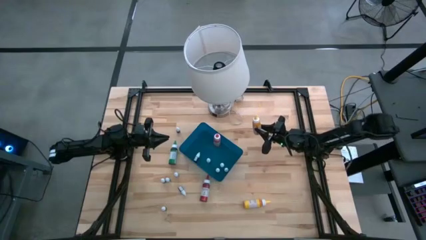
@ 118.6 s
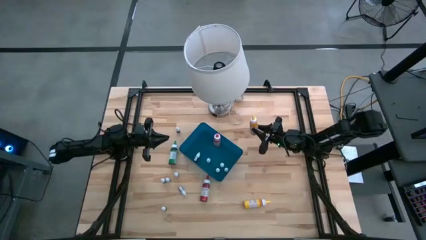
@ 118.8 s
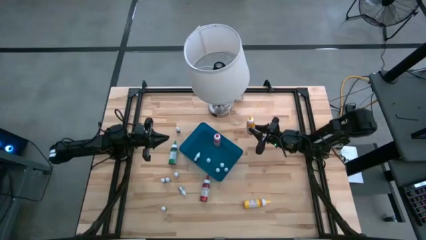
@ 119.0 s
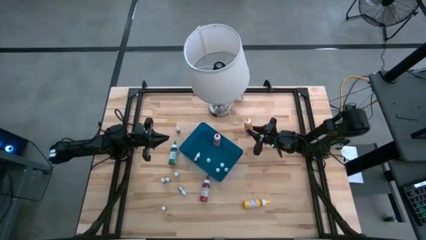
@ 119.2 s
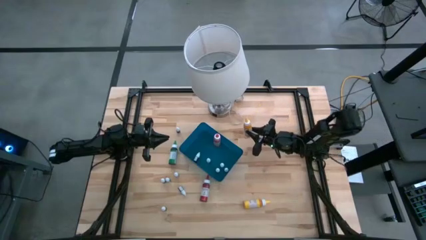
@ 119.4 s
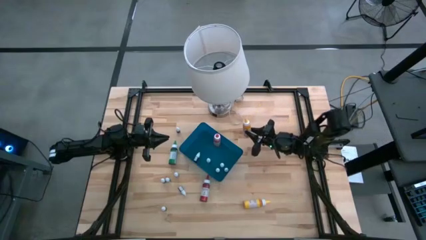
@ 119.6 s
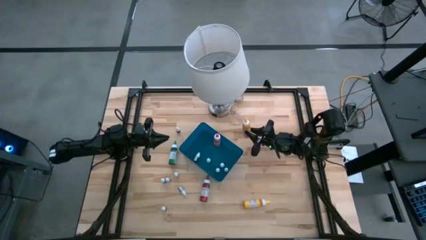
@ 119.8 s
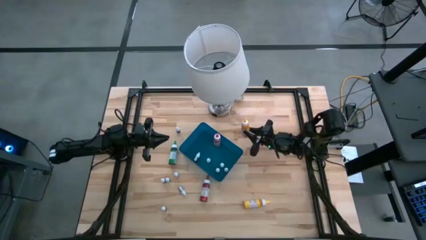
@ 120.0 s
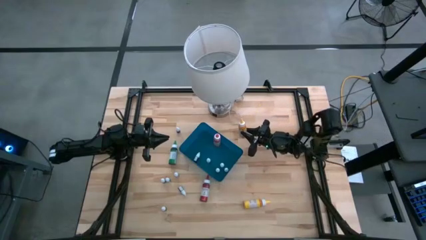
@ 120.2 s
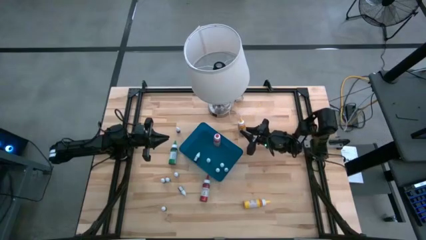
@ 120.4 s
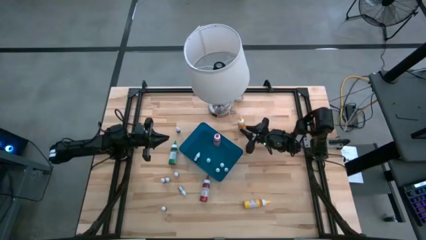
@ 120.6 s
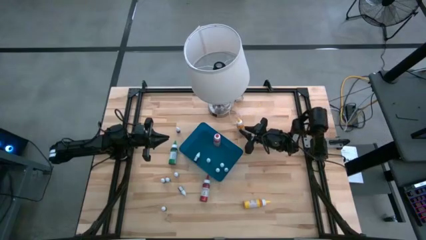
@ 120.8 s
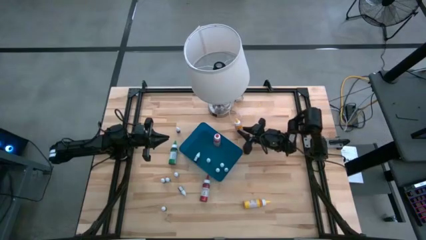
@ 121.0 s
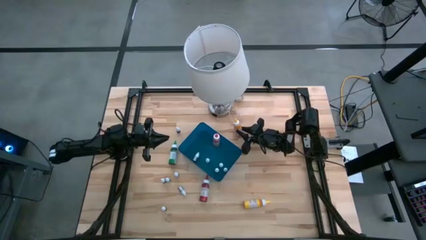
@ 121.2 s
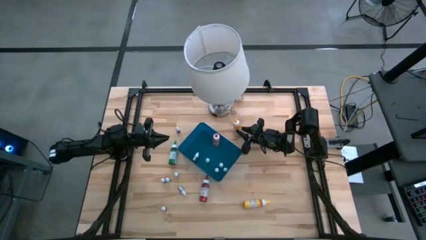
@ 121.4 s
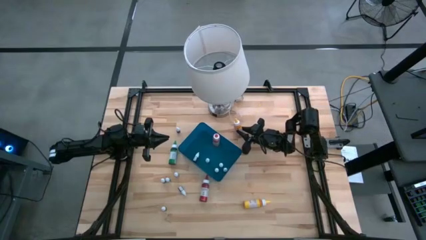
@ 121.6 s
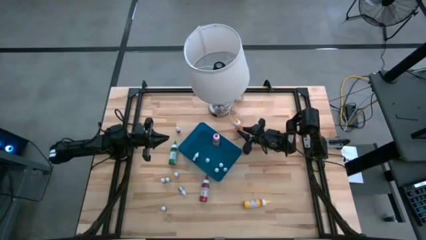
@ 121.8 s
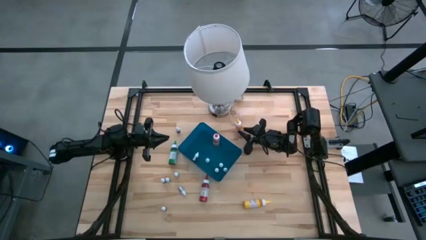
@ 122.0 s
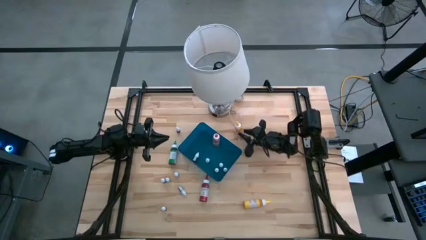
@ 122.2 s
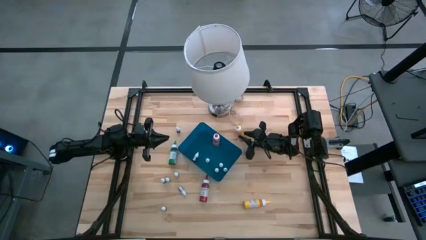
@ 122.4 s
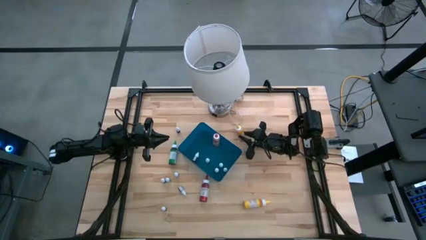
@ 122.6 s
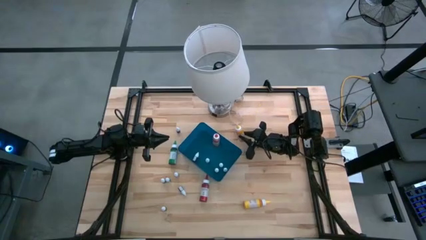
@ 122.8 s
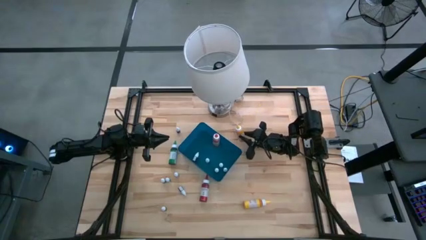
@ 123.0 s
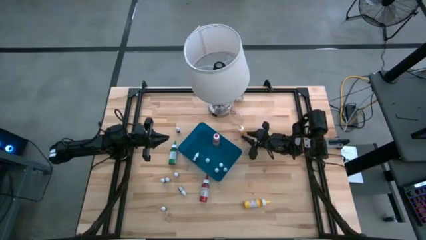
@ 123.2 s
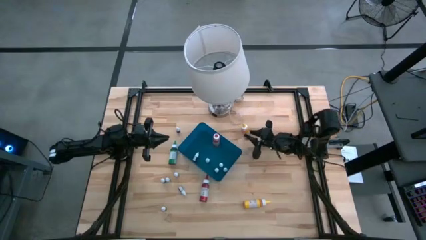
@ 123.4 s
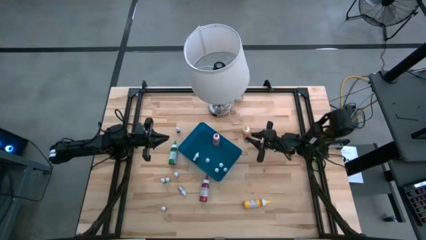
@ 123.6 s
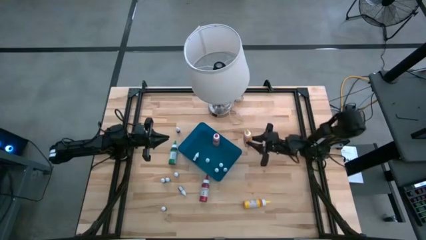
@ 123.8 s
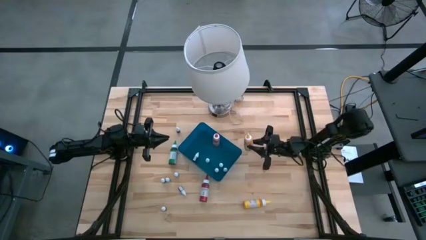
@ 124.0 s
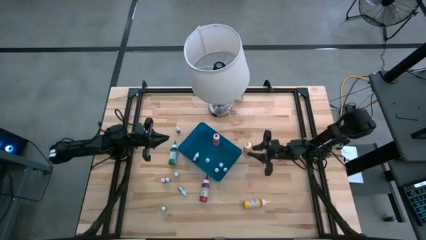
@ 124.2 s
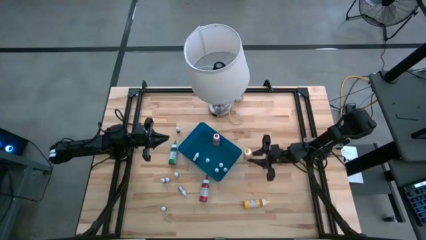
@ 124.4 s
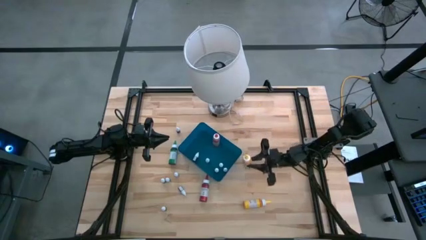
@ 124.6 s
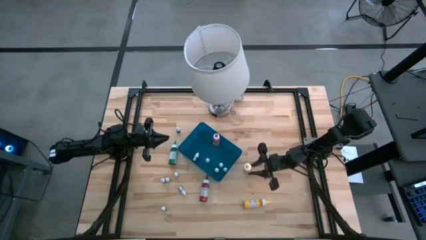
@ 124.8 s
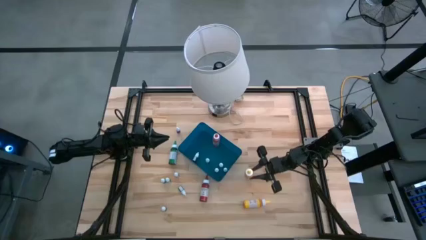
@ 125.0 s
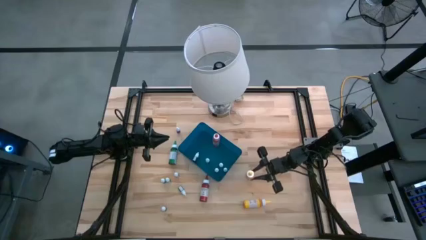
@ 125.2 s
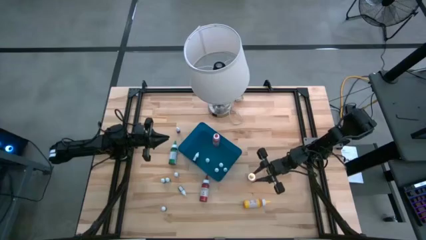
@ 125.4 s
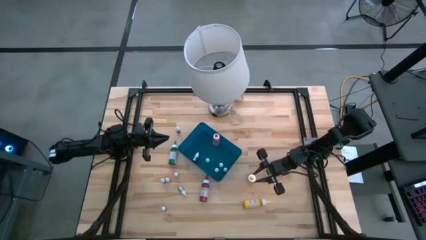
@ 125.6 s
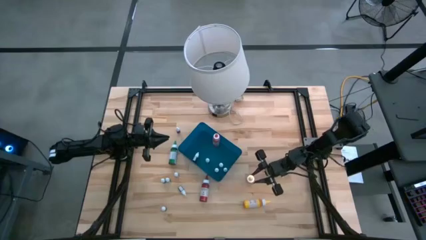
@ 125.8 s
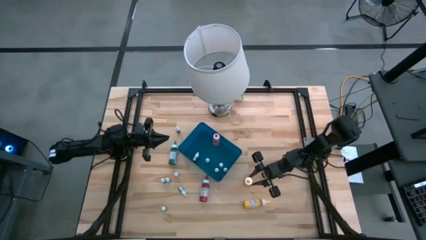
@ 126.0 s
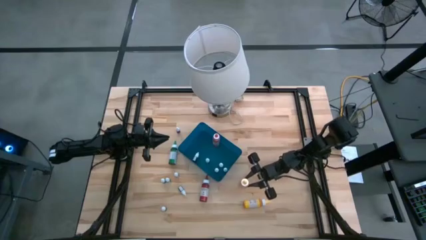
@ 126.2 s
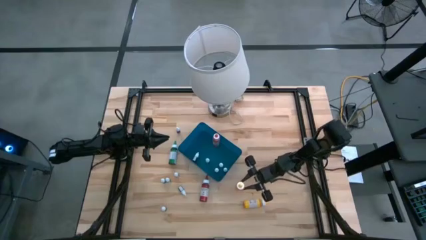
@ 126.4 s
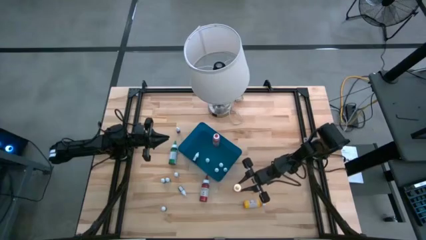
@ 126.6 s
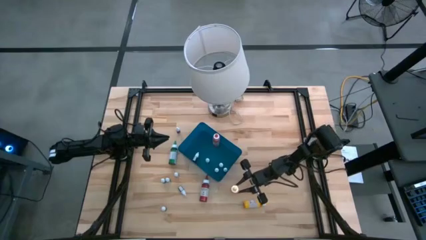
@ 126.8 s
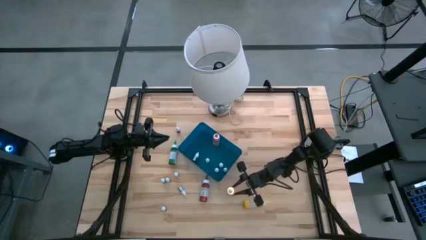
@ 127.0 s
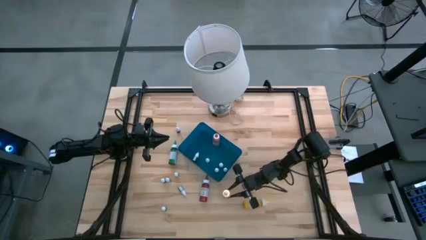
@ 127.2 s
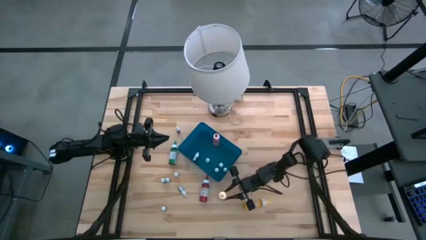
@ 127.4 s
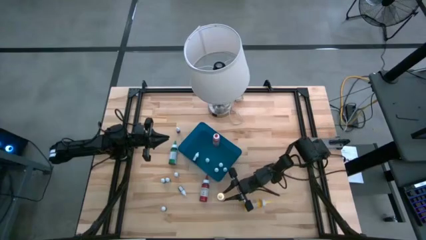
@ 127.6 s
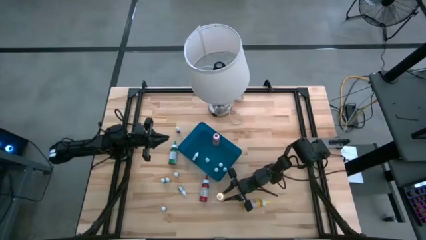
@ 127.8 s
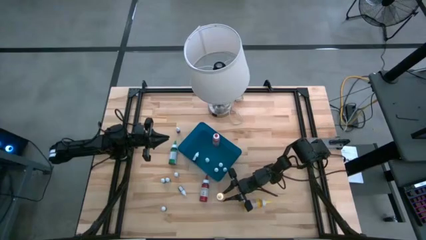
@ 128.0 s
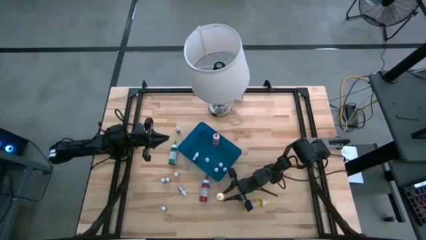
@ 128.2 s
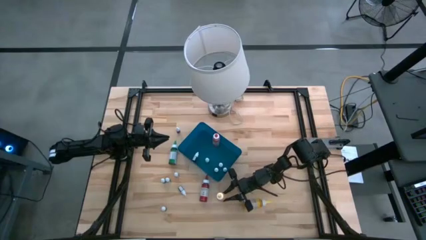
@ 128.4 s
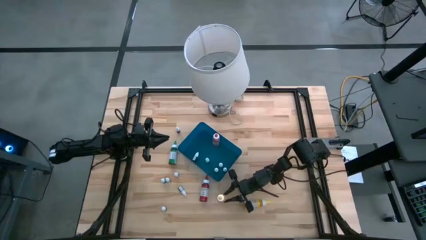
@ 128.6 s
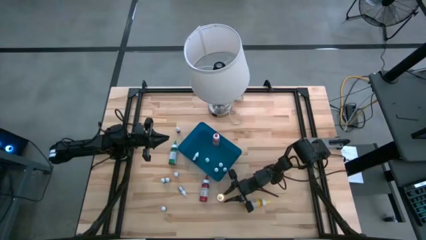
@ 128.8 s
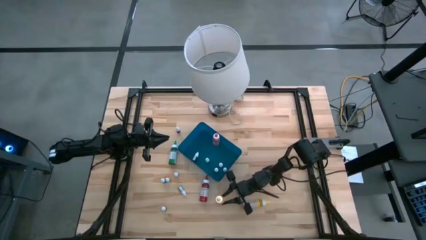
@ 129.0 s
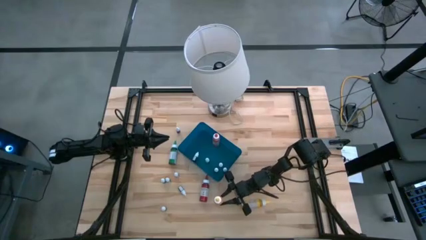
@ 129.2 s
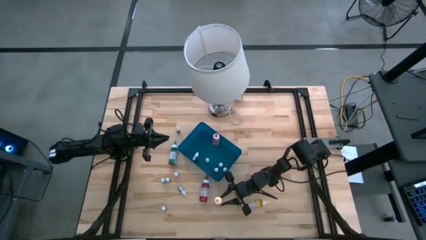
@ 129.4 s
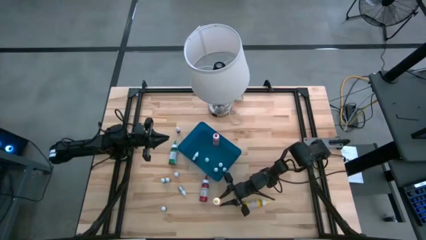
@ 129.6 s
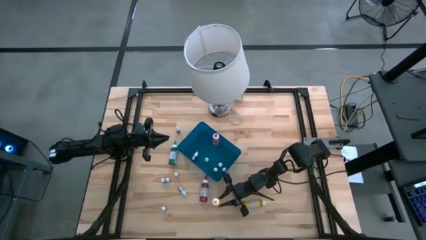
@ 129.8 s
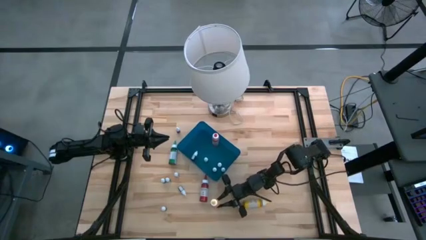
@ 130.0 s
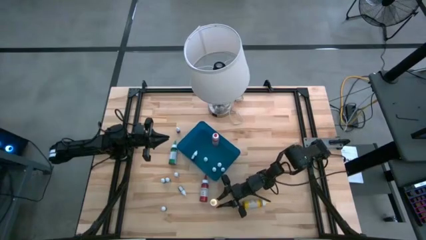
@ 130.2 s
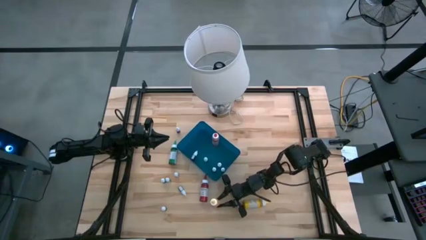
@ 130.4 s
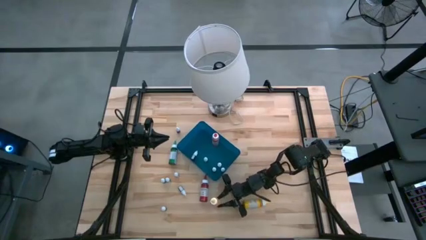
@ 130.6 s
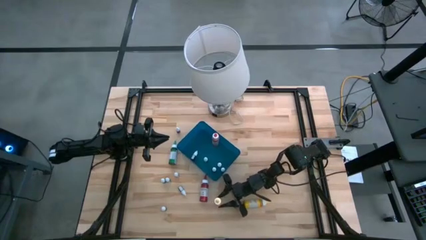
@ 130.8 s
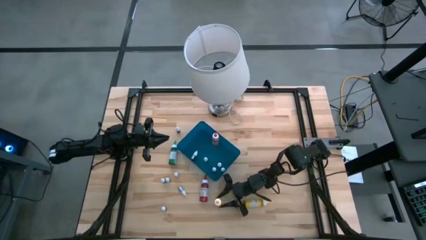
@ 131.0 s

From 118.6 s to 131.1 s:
Task: Pick & Place food coloring
Remove the large yellow food coloring bottle from the blue container
